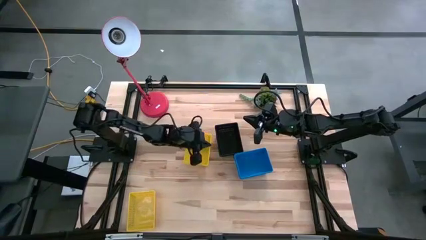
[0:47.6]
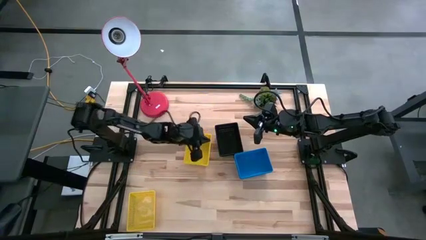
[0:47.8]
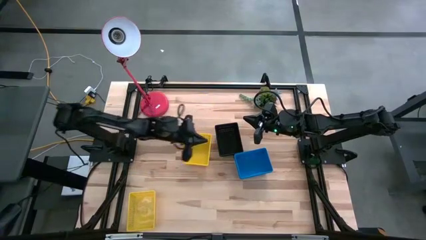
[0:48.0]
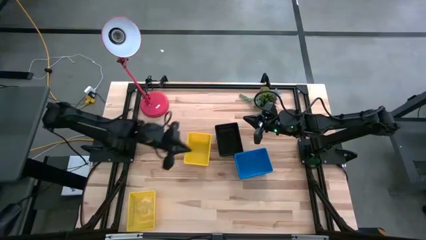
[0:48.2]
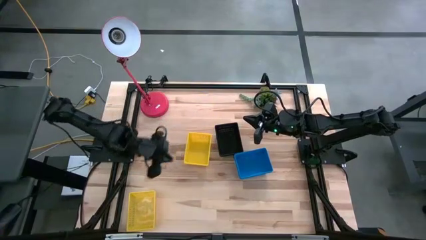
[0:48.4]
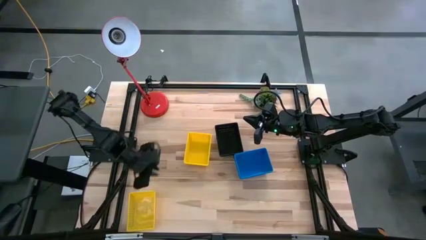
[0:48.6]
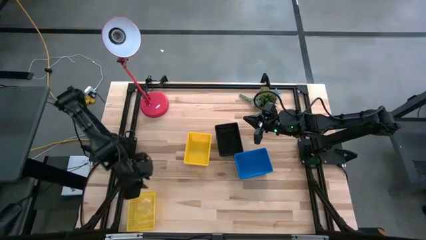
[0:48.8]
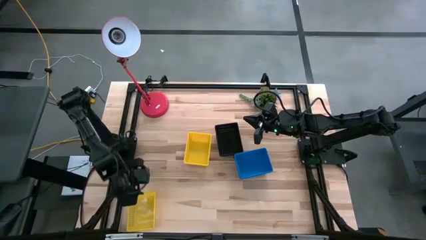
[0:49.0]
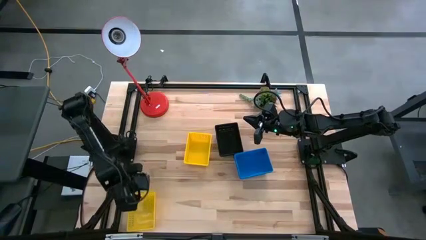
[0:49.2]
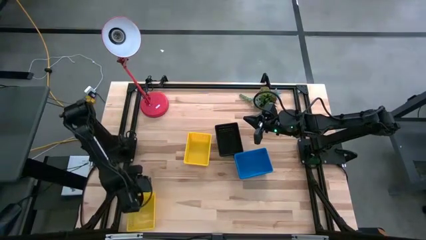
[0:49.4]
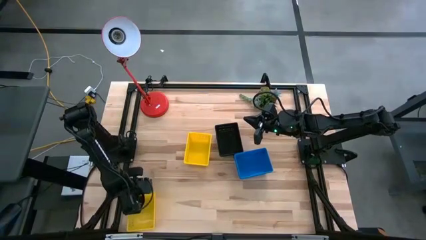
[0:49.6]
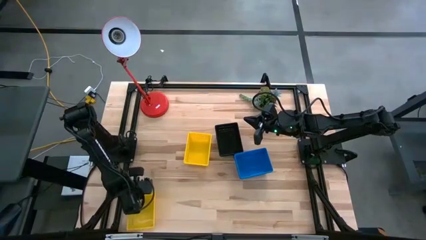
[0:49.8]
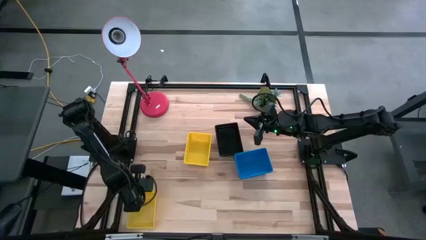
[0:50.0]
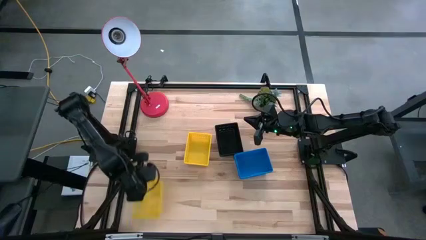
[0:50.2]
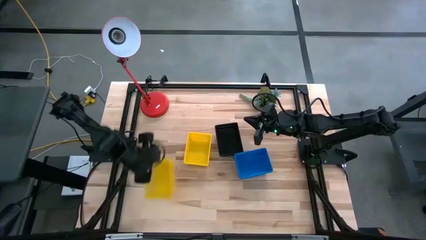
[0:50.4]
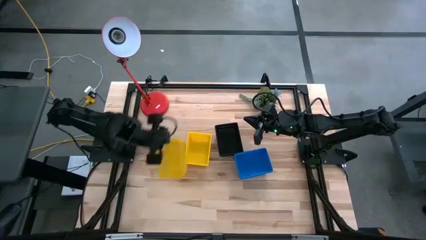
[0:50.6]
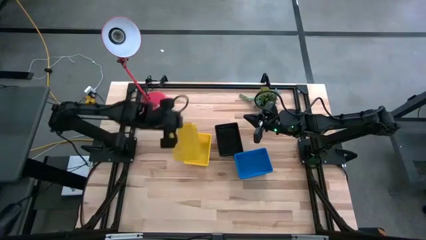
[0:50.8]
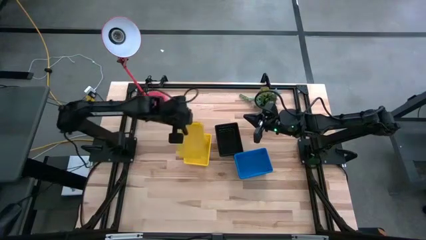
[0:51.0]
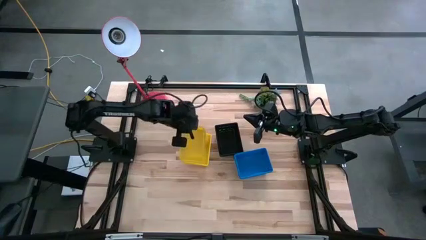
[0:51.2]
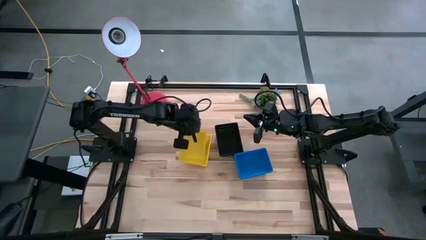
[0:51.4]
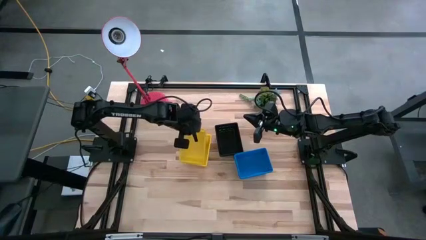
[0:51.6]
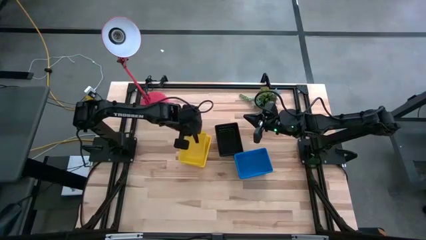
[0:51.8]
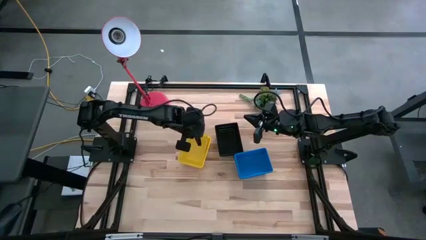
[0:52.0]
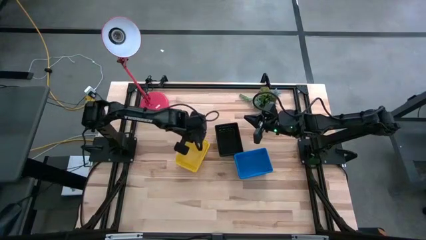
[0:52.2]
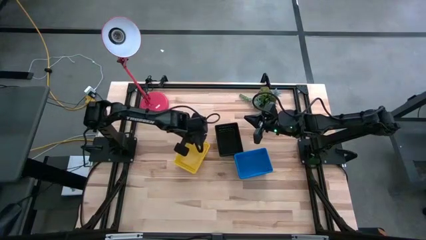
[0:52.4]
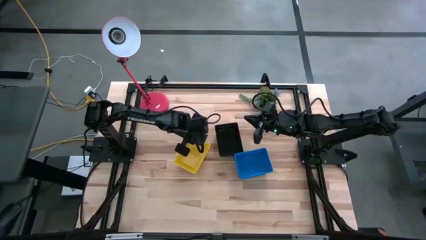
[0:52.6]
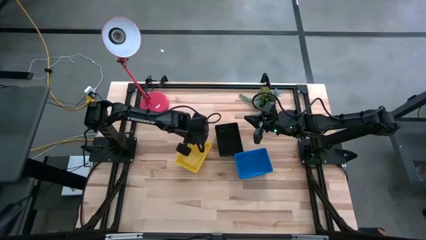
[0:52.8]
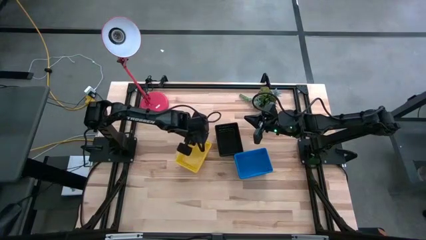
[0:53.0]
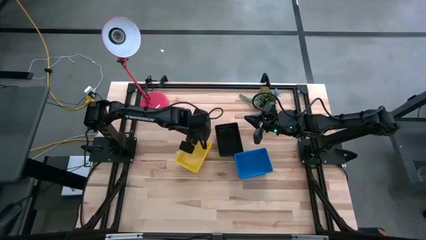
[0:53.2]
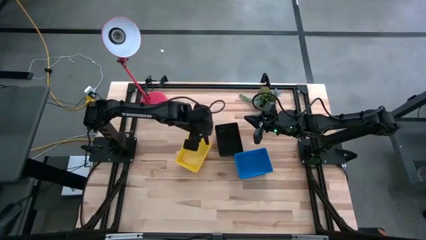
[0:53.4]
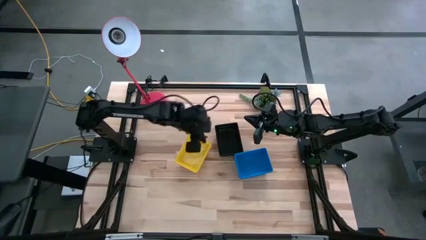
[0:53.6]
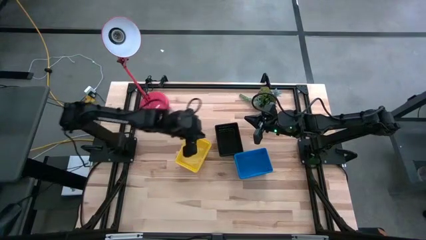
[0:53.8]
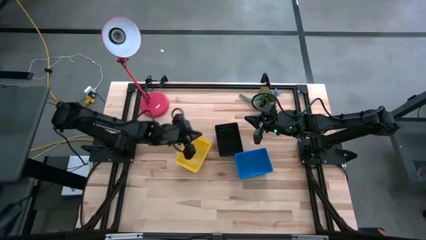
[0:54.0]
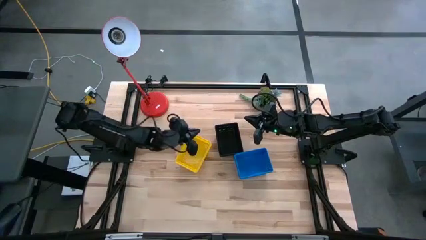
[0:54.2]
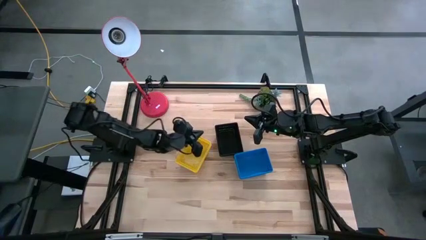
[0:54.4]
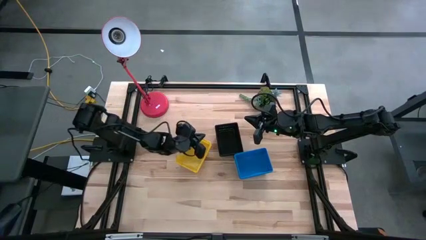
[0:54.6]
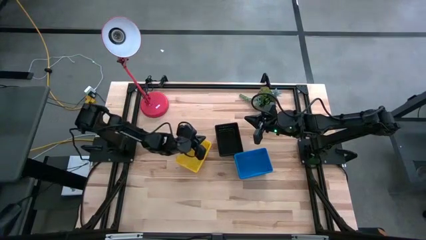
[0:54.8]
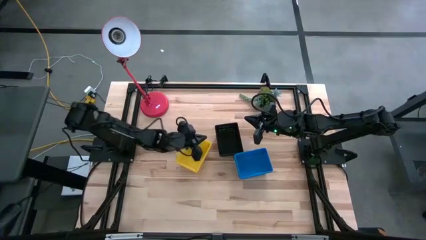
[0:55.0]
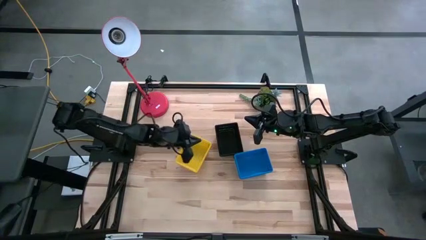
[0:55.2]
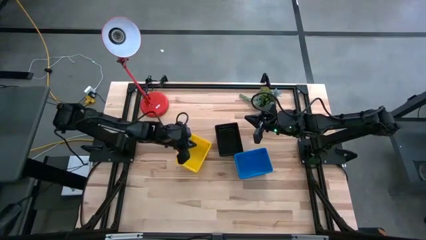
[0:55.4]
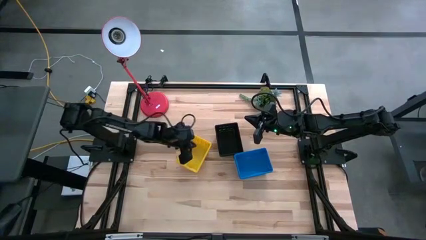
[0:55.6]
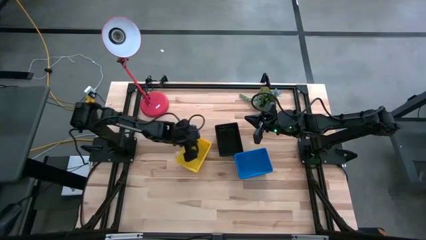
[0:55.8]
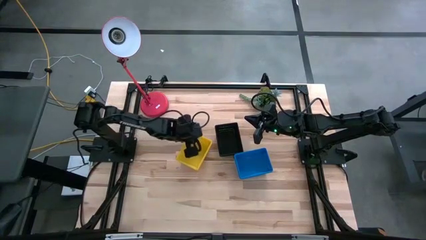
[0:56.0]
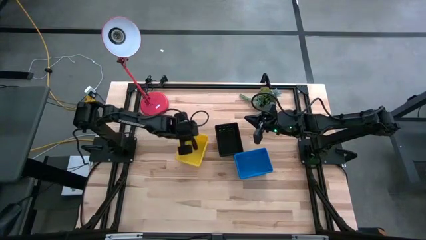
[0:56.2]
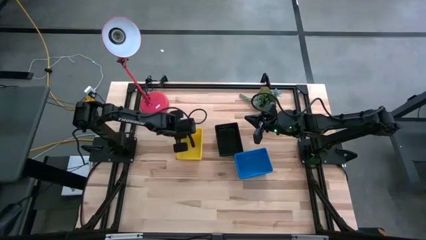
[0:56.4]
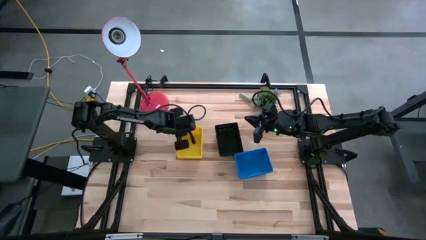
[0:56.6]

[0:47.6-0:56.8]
Stack the bottom yellow bin on the top yellow bin

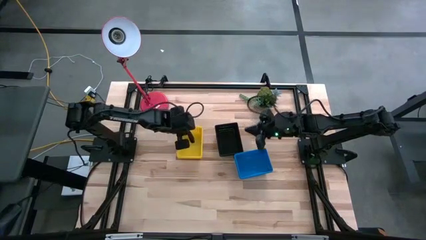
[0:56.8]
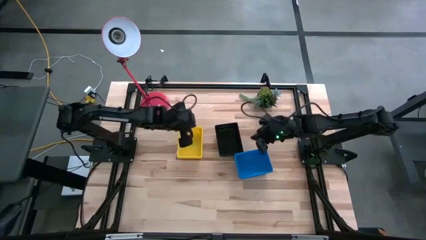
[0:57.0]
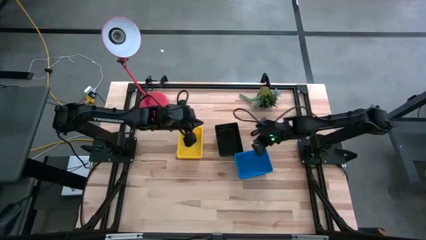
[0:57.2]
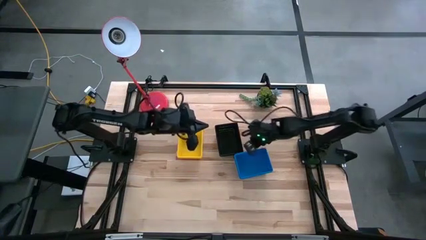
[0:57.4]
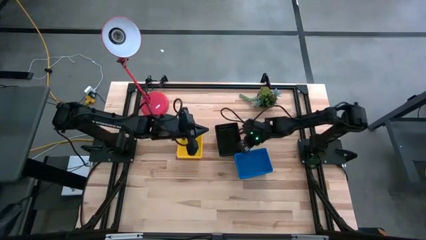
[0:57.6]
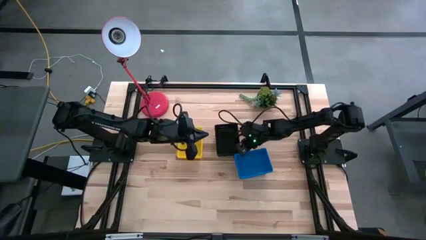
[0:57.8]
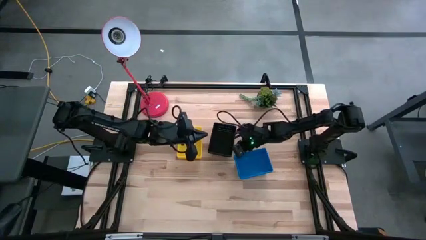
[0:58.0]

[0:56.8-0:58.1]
Adjust the stacked black bin

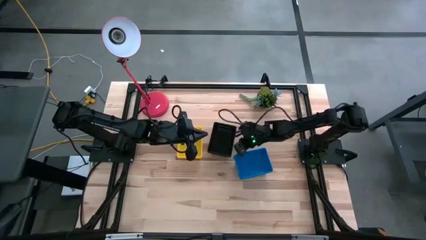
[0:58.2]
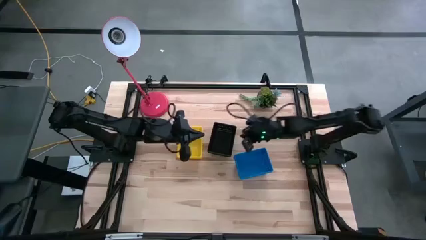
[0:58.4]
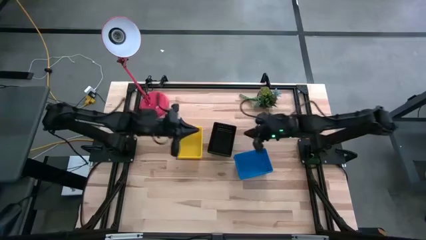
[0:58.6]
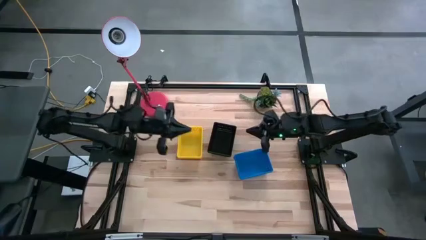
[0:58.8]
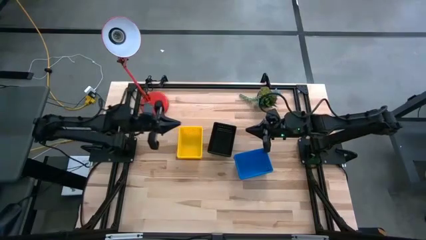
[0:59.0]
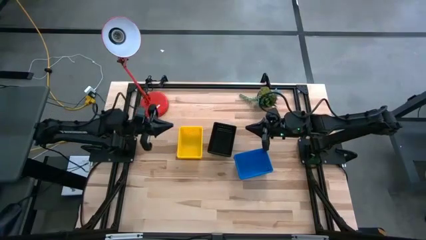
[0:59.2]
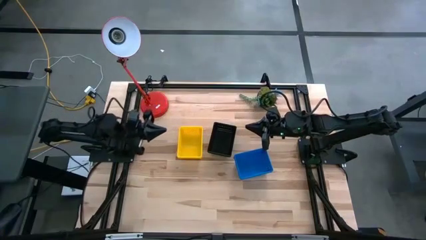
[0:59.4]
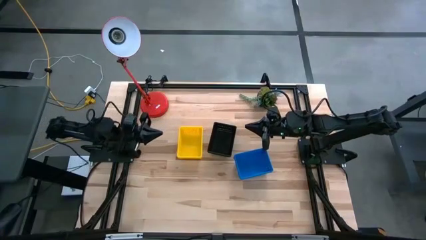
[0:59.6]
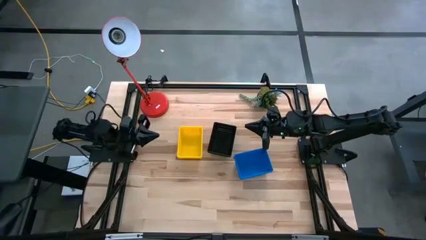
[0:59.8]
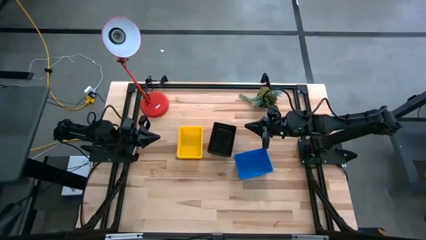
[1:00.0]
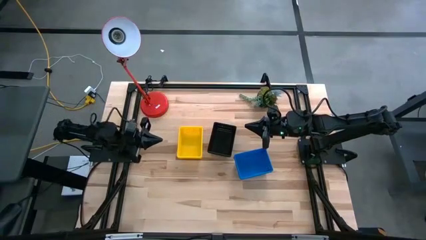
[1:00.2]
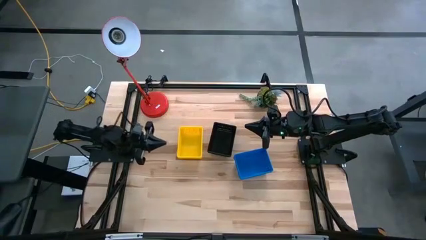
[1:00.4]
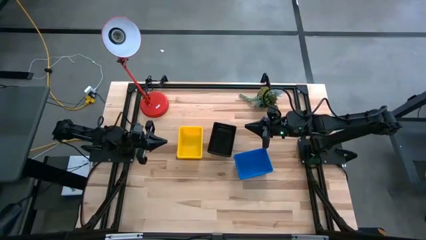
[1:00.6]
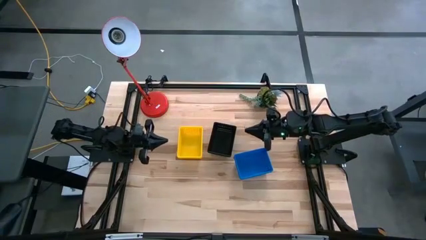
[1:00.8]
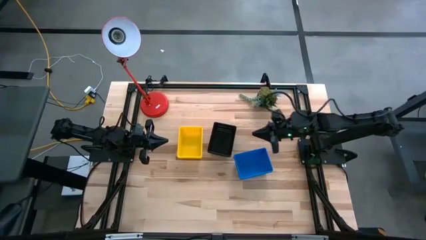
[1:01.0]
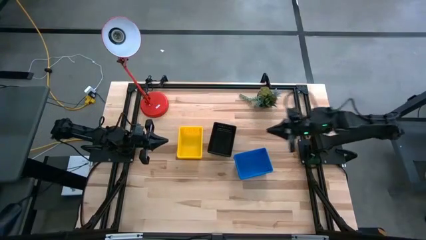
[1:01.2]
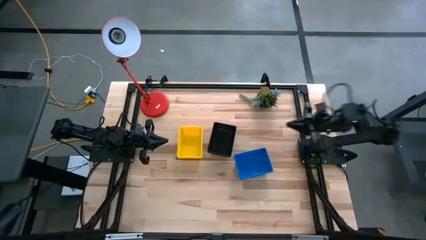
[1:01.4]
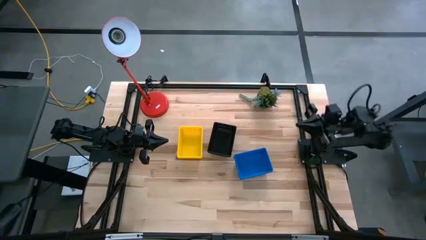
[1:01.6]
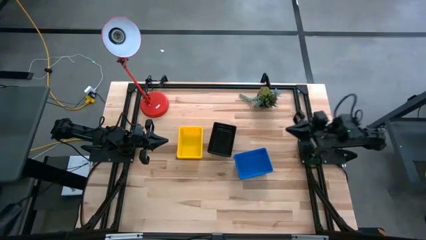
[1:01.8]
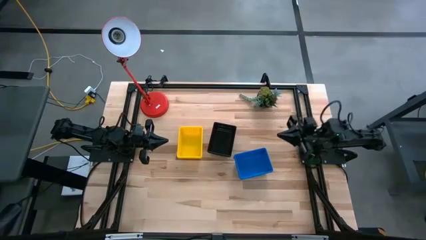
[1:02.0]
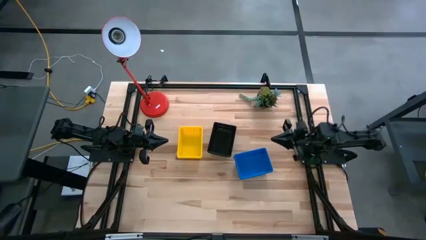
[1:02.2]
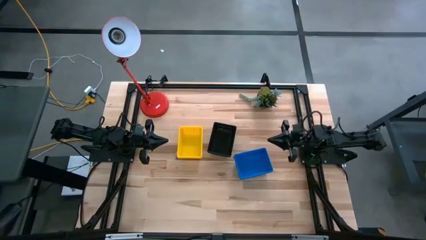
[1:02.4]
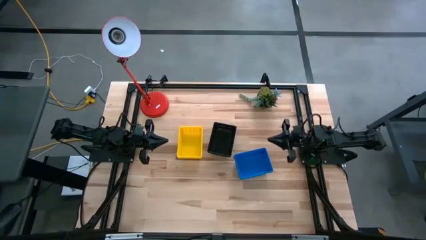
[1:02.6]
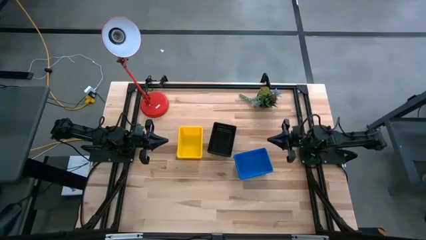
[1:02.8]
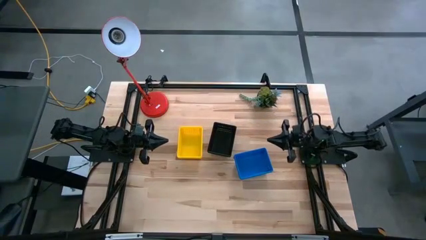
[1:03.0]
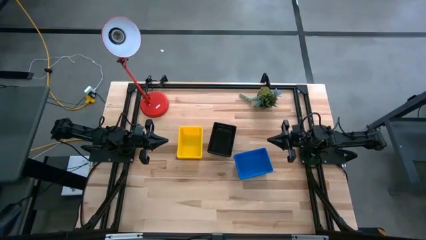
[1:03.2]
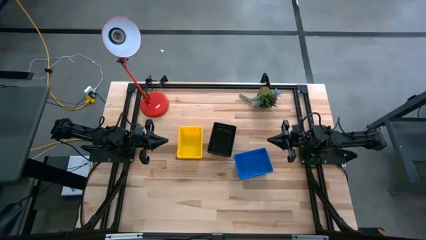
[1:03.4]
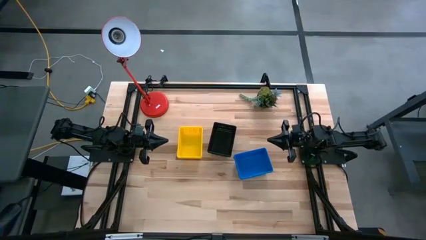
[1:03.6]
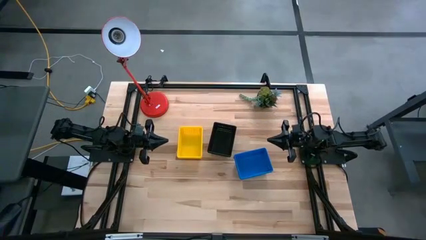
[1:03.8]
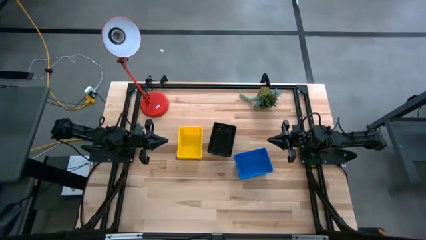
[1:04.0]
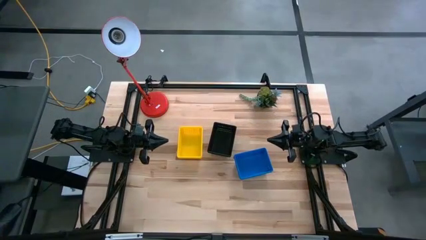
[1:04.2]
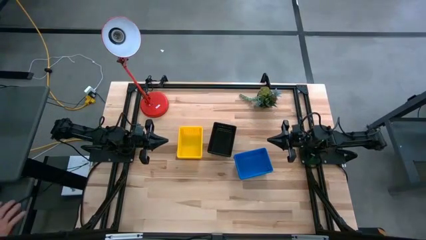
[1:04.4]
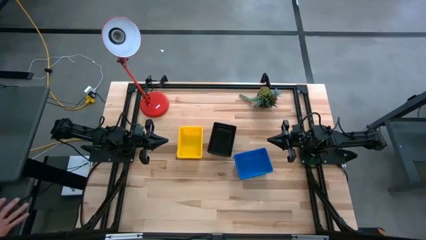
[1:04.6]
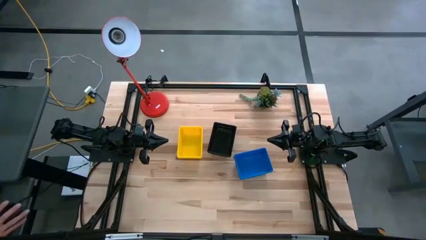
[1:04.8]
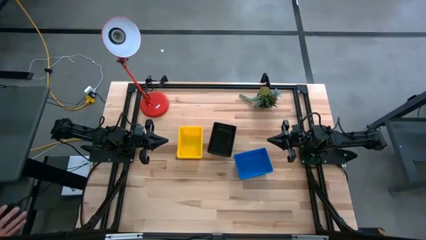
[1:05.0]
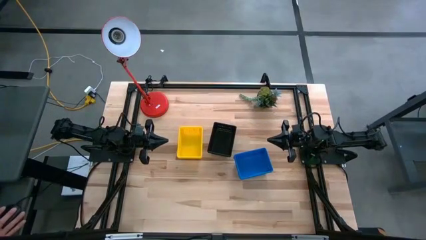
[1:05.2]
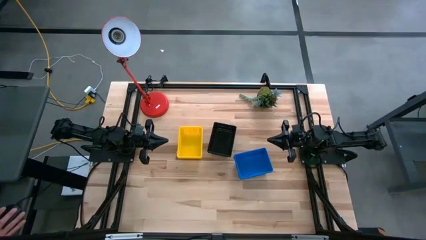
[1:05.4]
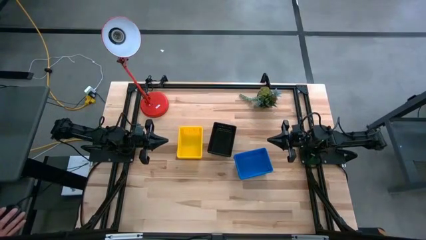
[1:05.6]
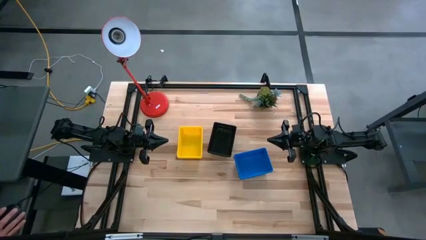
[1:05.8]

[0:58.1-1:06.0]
Return to Home Position
